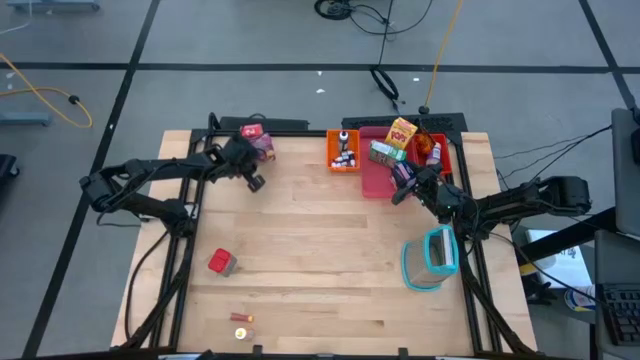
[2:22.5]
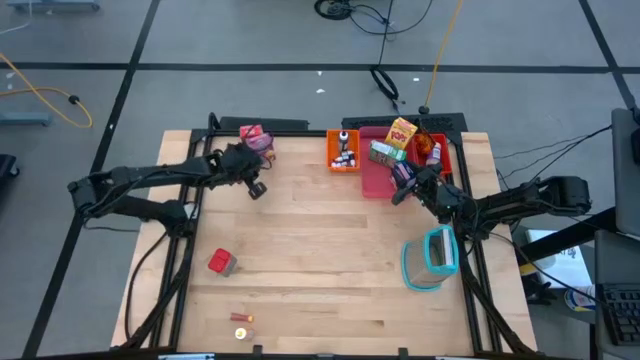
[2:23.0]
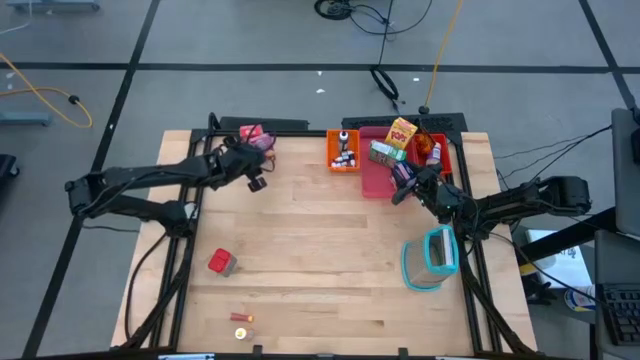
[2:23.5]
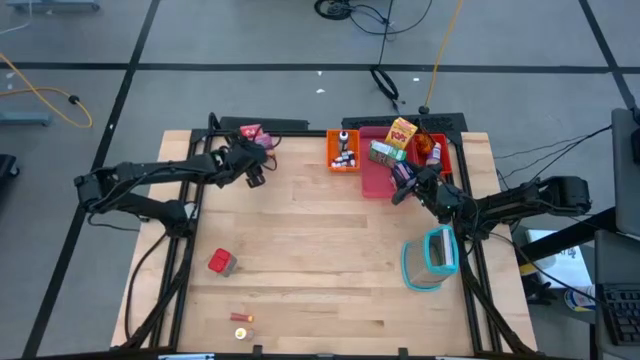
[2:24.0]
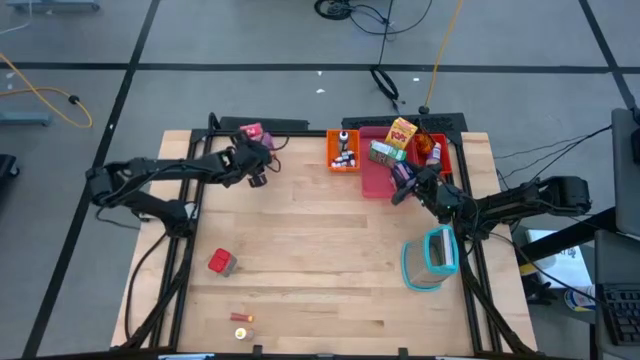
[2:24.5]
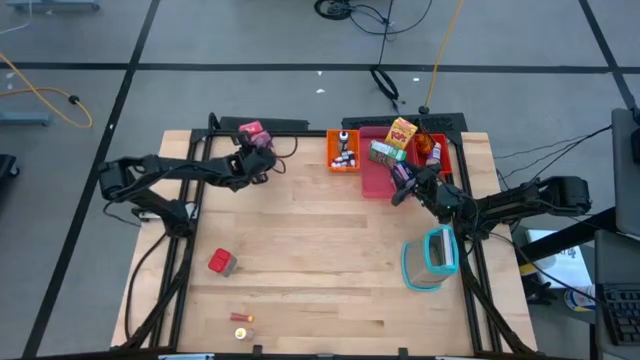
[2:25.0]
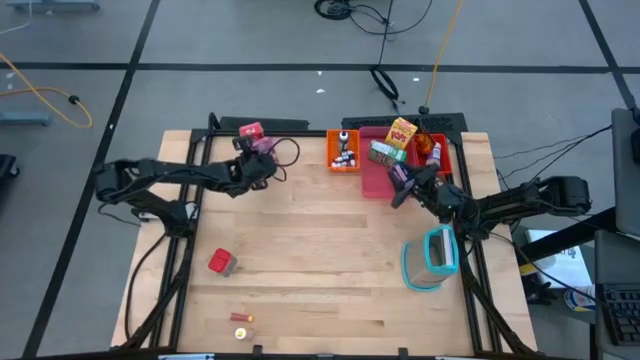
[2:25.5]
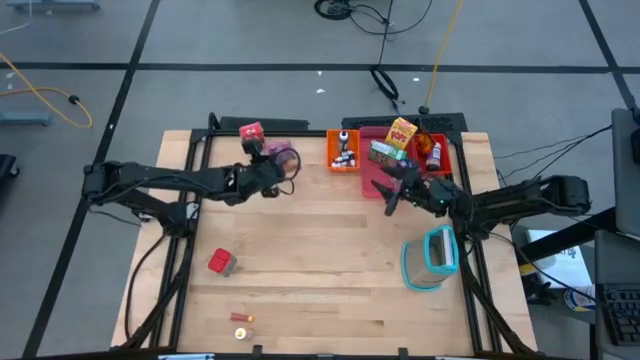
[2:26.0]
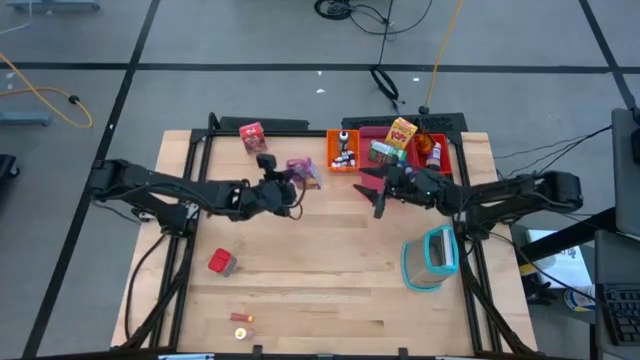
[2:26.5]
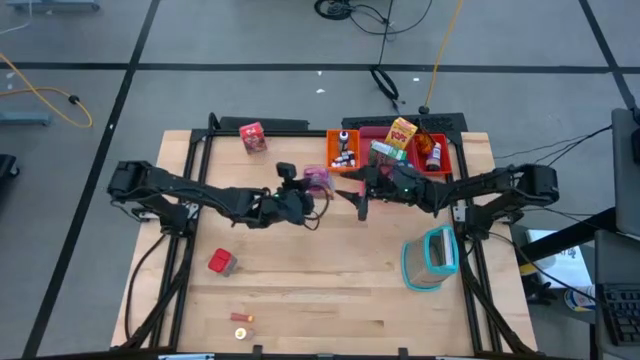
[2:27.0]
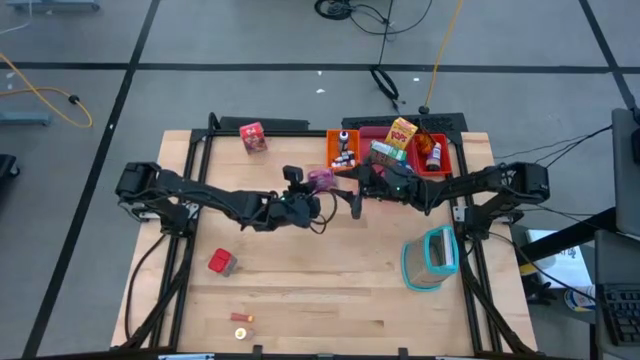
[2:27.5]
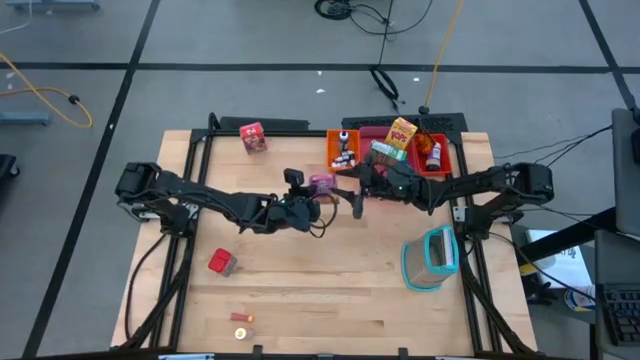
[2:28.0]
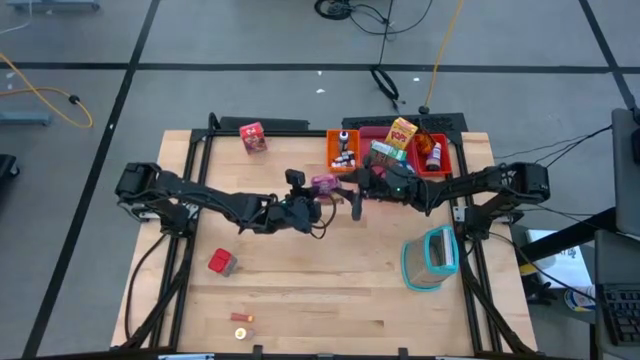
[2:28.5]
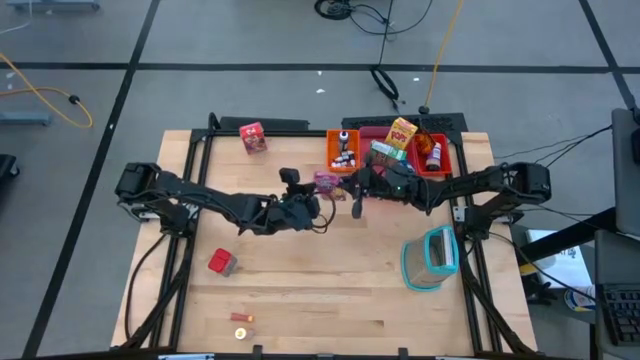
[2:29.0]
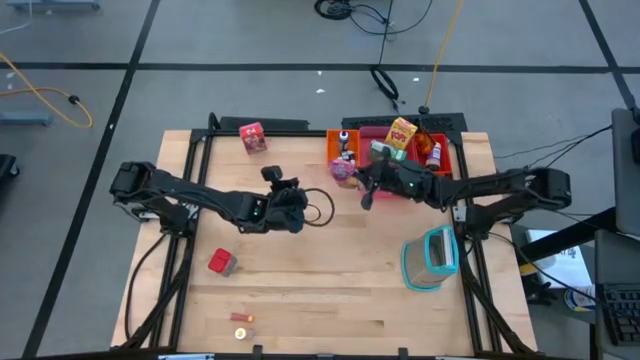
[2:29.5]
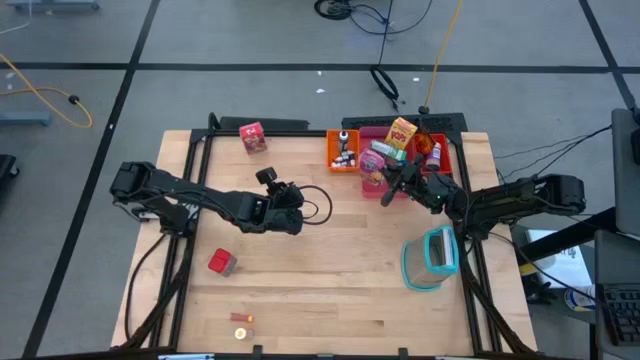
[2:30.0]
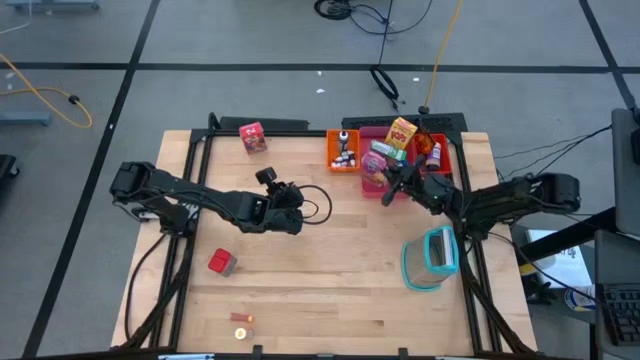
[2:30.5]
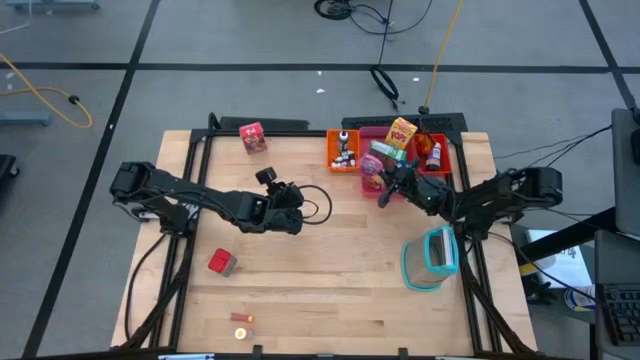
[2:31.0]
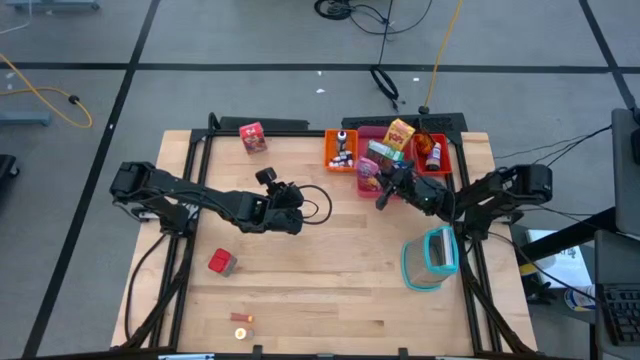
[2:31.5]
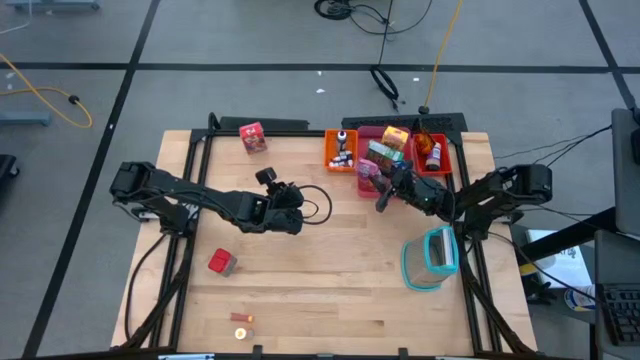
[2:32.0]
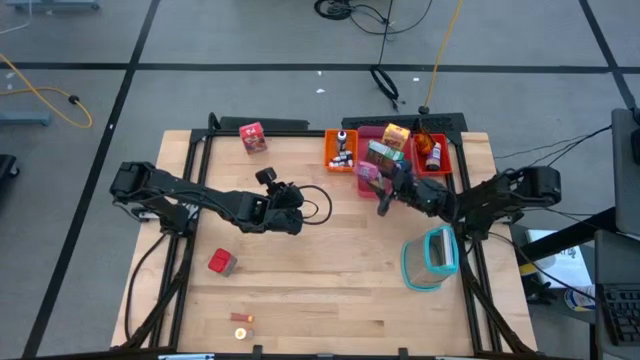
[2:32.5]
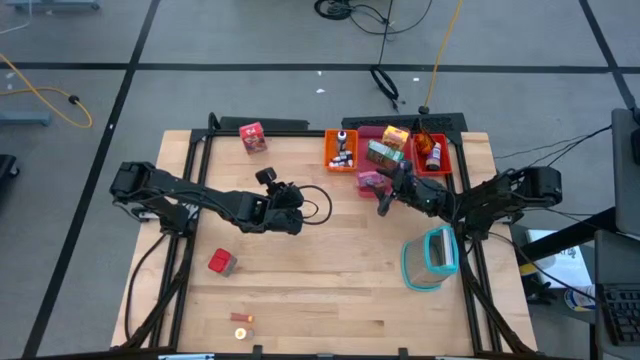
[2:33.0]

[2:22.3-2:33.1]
Task: Pick & Place Kitchen Items
Put the purple cereal box into the pink bin

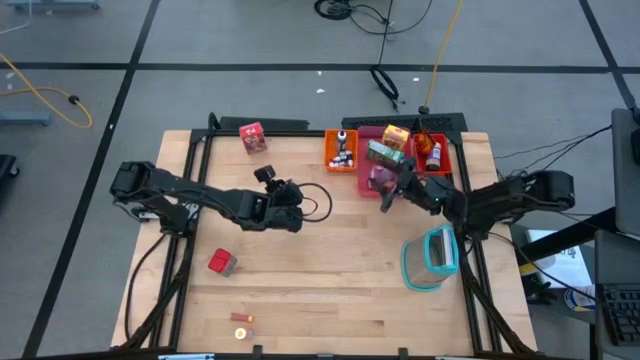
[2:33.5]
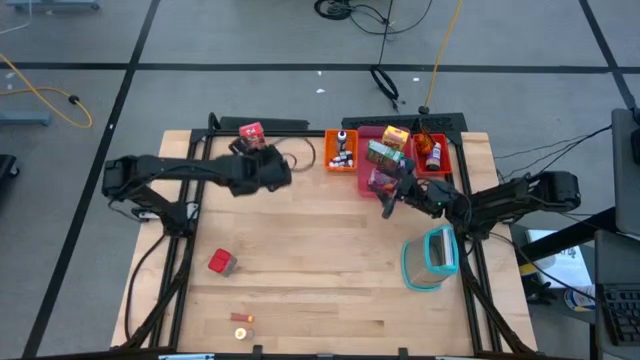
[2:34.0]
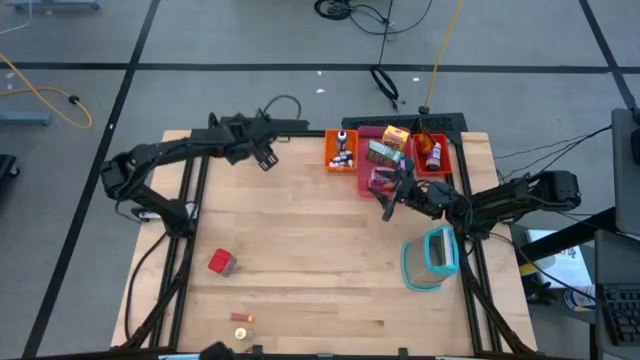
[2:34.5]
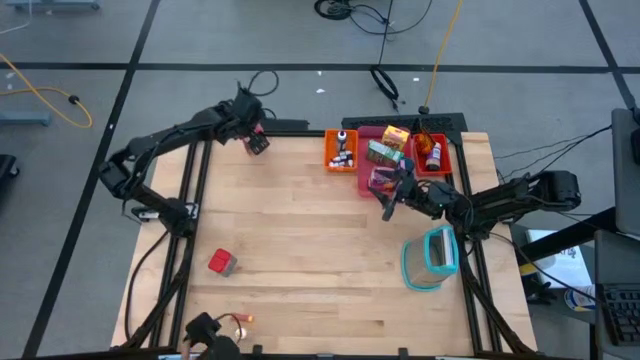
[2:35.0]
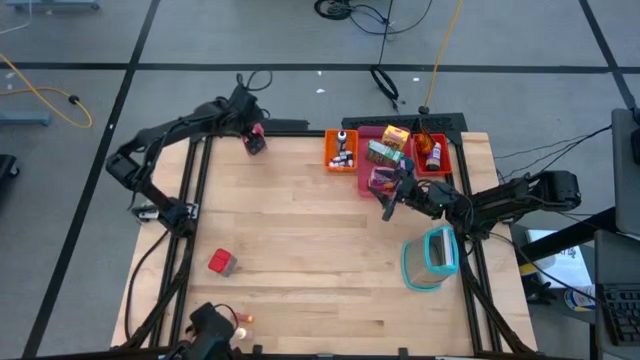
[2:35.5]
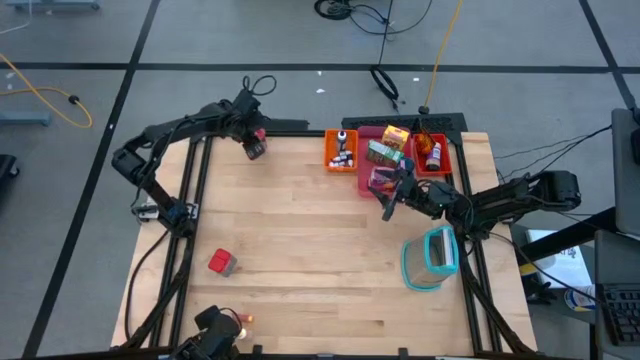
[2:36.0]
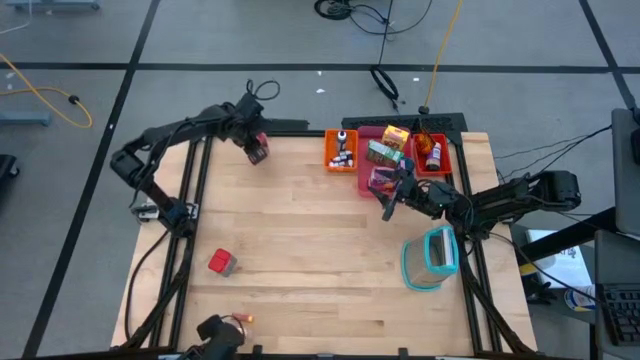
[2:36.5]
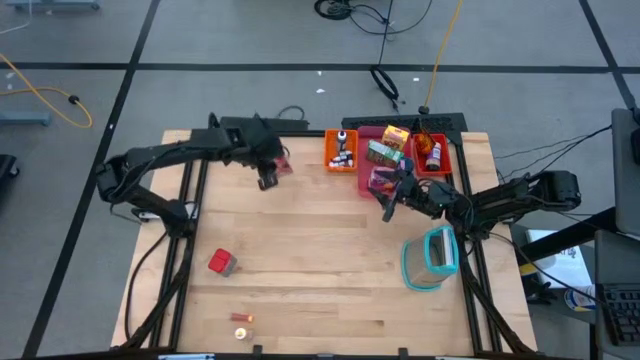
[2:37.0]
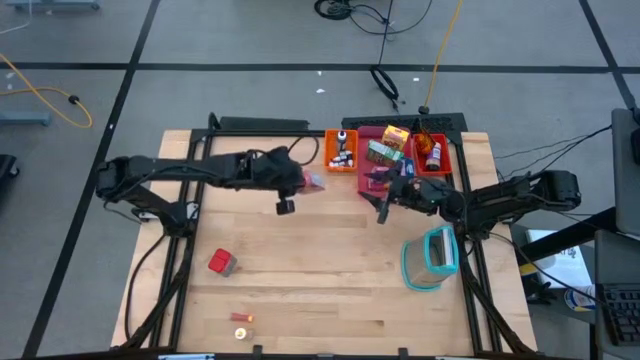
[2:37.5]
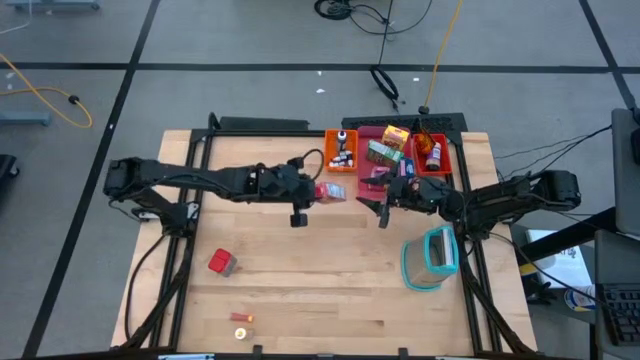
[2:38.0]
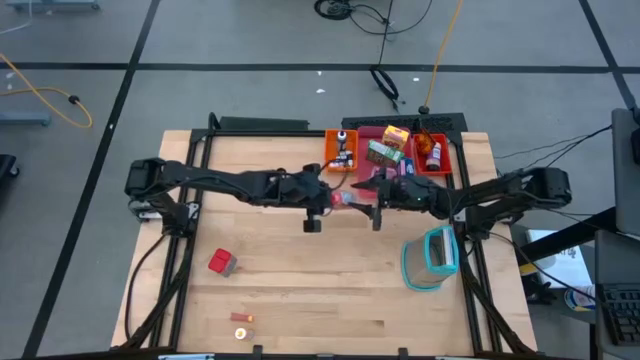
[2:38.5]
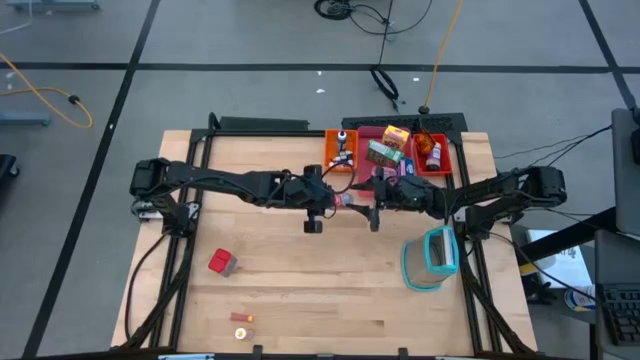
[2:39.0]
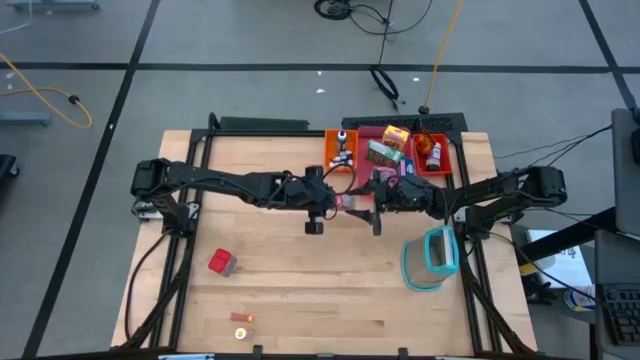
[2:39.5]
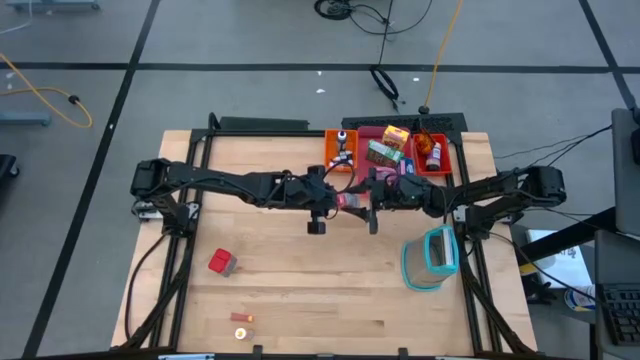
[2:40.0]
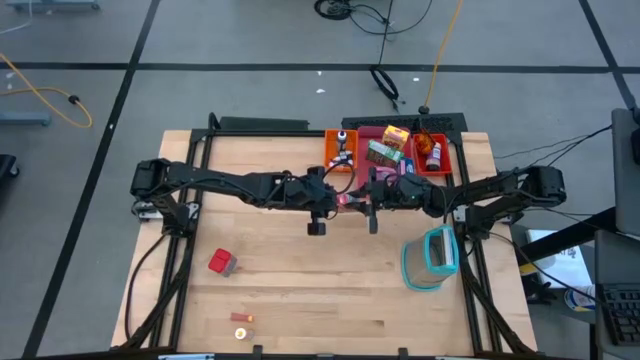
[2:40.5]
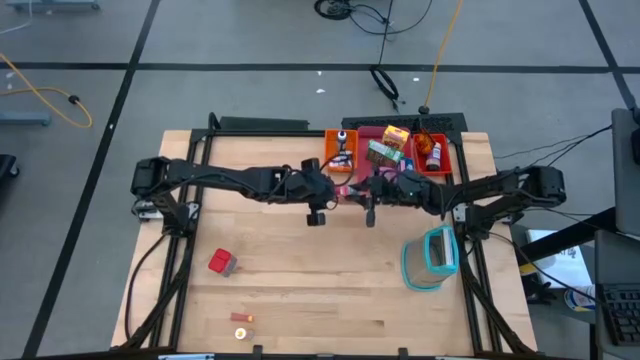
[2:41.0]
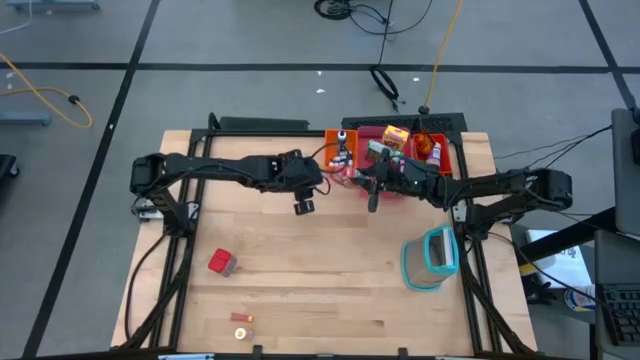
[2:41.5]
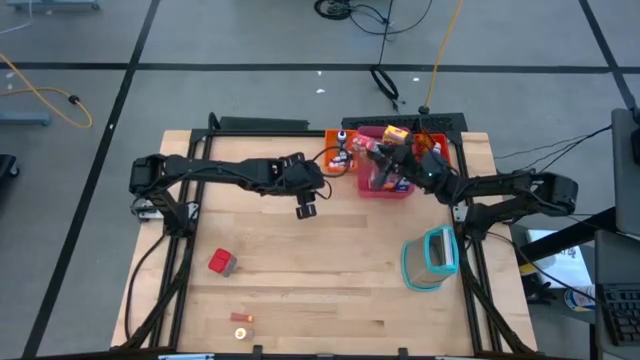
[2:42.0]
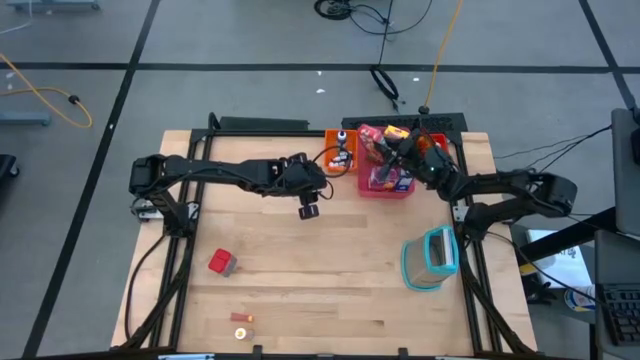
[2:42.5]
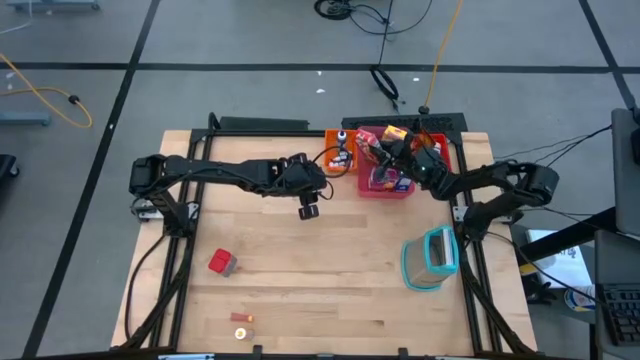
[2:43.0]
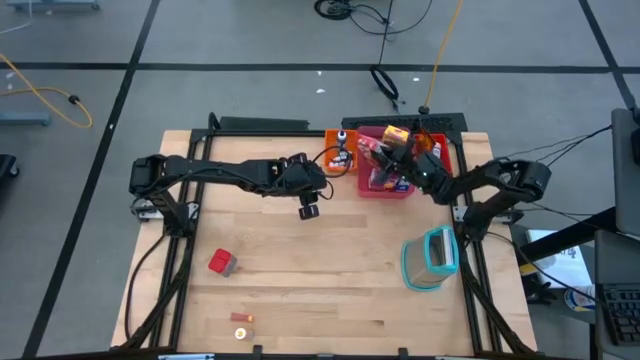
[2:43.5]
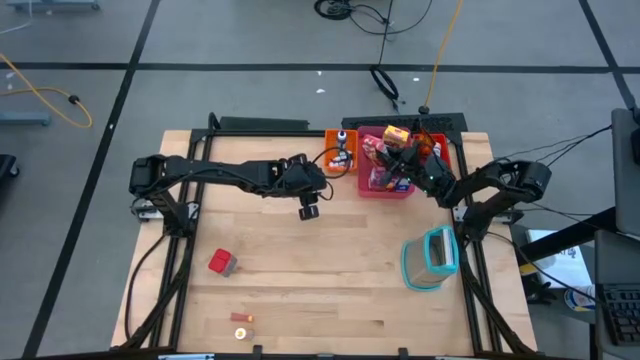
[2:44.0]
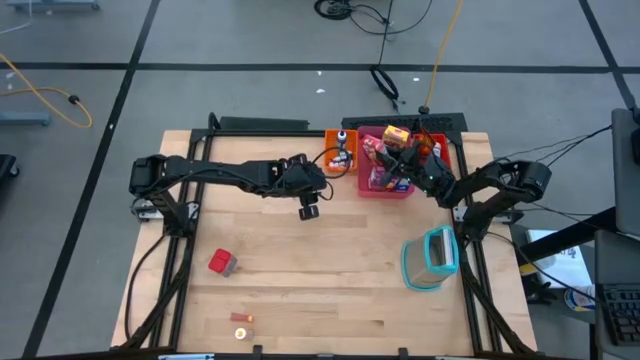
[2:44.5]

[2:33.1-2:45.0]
Put the red cereal box into the pink bin
